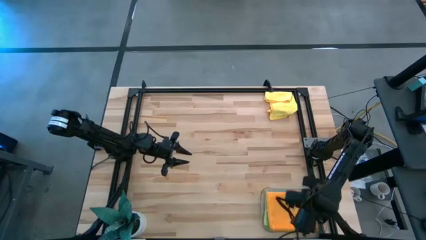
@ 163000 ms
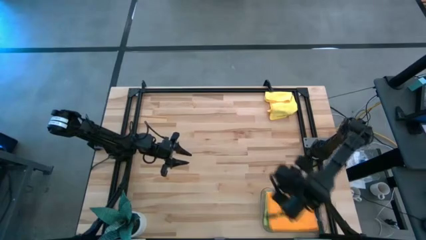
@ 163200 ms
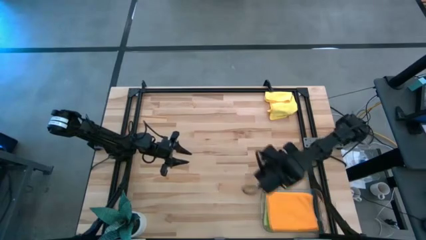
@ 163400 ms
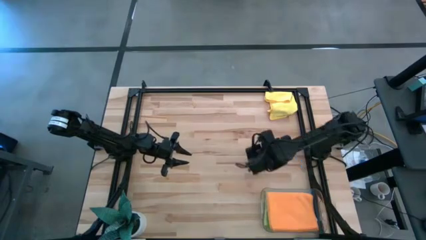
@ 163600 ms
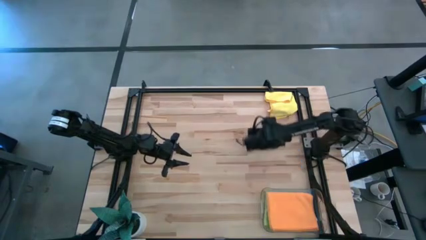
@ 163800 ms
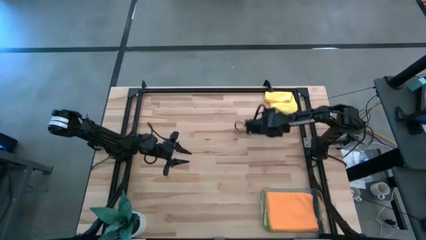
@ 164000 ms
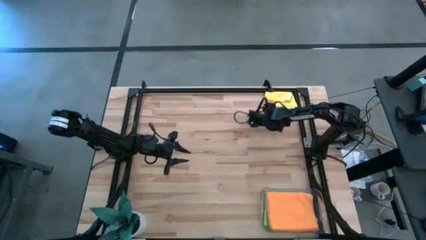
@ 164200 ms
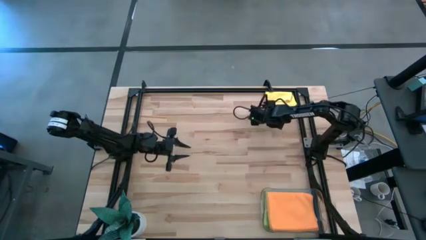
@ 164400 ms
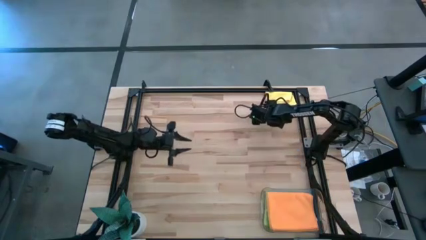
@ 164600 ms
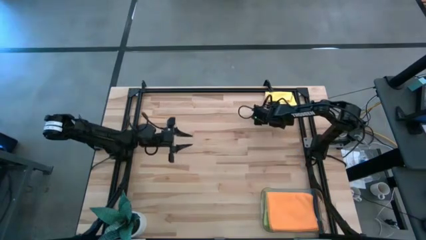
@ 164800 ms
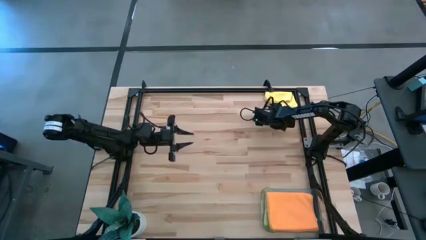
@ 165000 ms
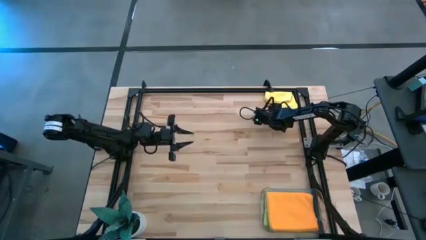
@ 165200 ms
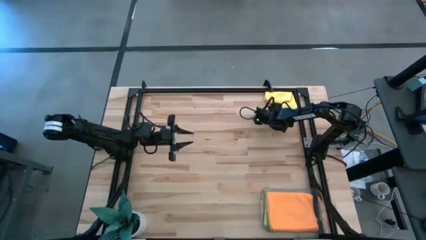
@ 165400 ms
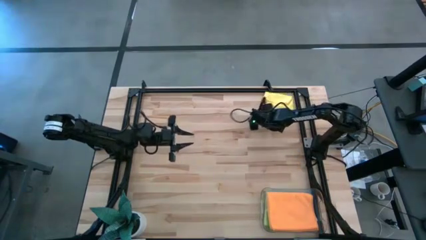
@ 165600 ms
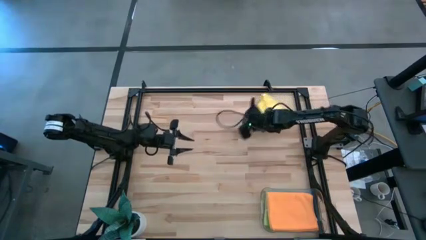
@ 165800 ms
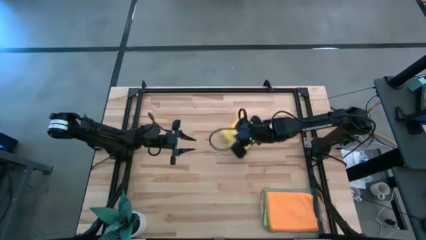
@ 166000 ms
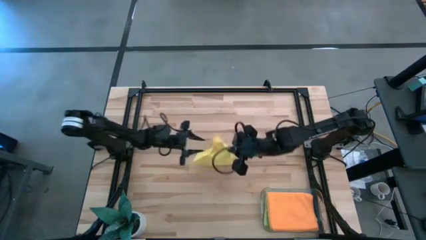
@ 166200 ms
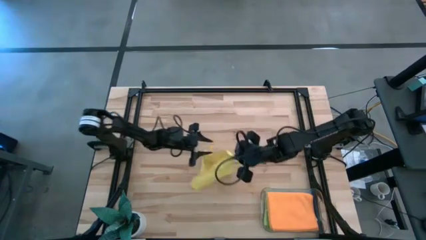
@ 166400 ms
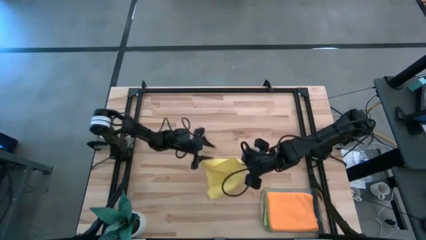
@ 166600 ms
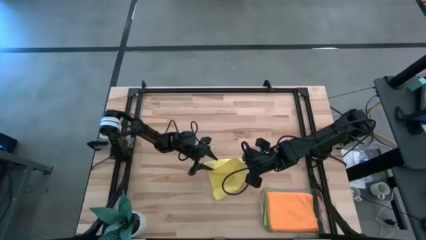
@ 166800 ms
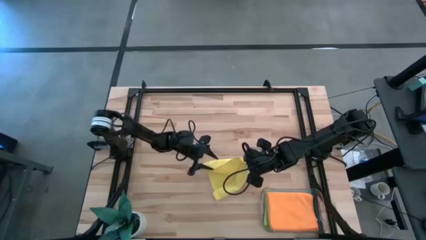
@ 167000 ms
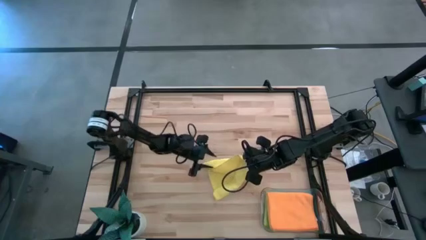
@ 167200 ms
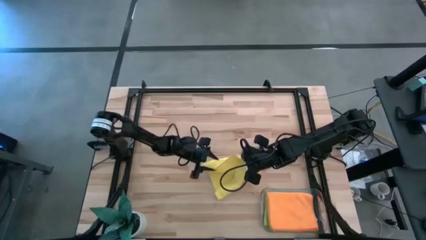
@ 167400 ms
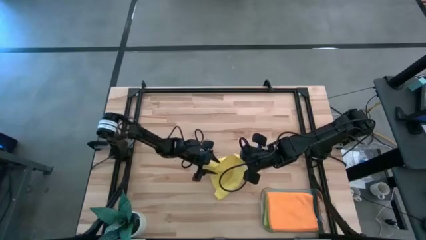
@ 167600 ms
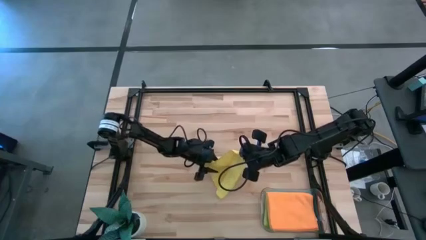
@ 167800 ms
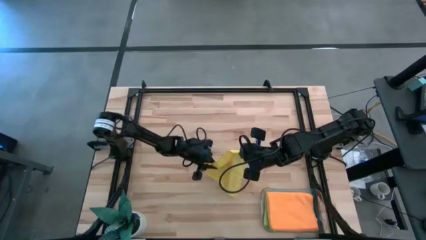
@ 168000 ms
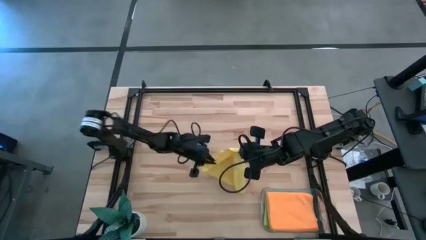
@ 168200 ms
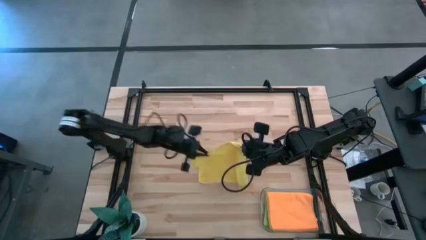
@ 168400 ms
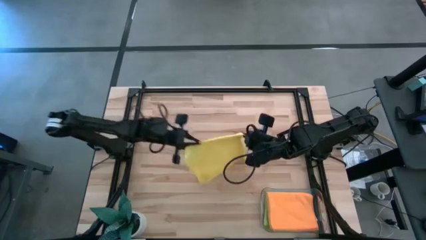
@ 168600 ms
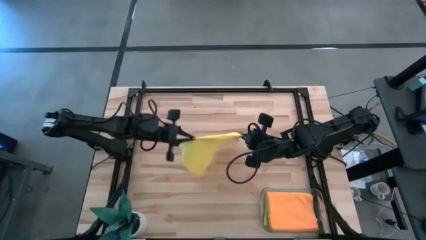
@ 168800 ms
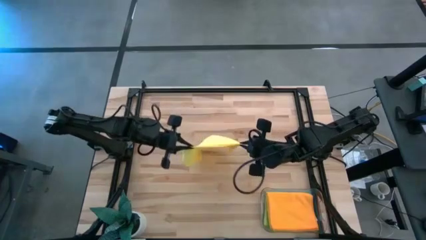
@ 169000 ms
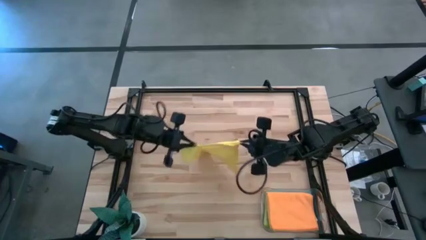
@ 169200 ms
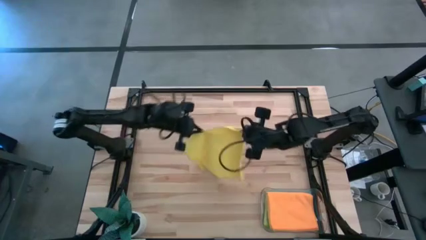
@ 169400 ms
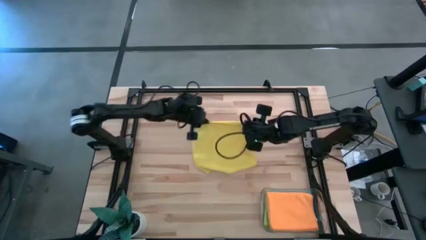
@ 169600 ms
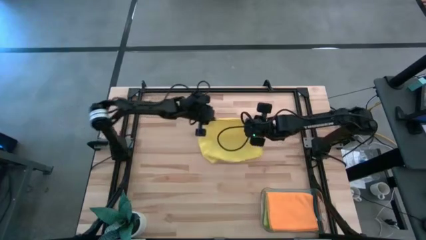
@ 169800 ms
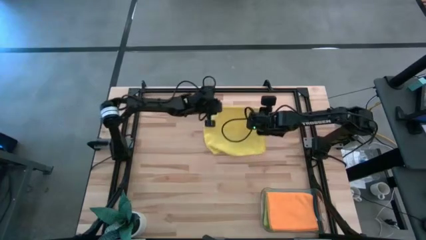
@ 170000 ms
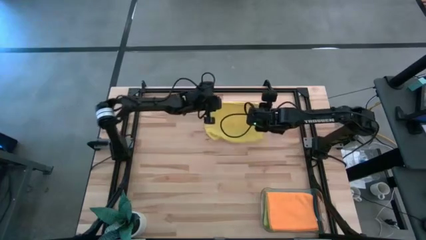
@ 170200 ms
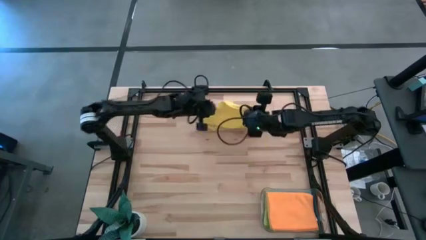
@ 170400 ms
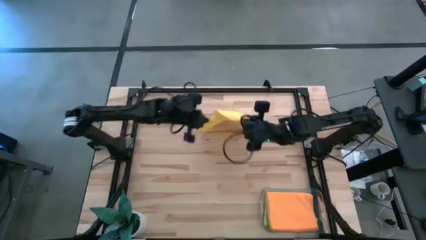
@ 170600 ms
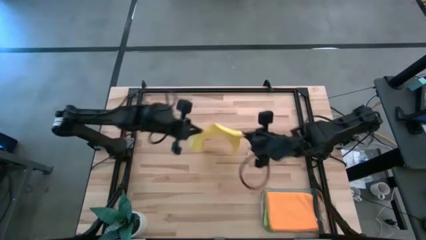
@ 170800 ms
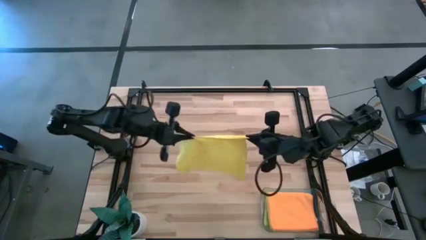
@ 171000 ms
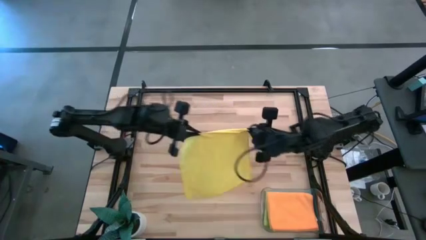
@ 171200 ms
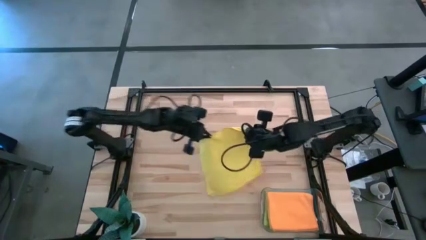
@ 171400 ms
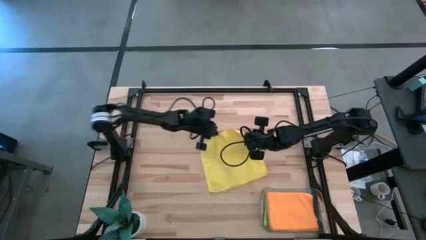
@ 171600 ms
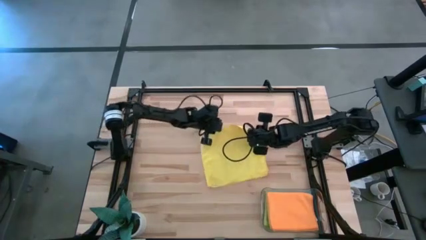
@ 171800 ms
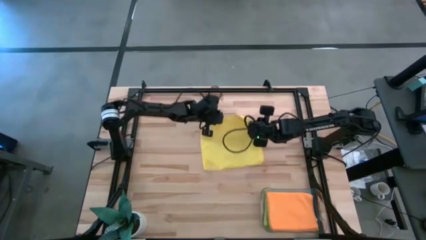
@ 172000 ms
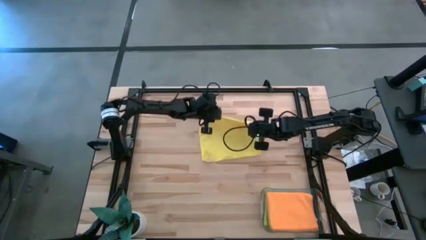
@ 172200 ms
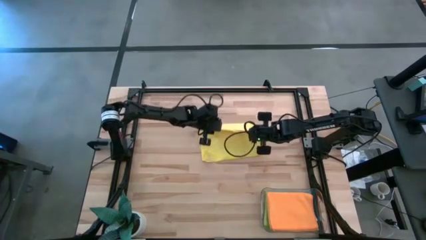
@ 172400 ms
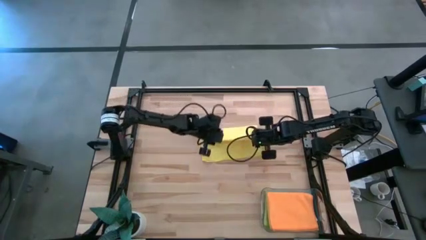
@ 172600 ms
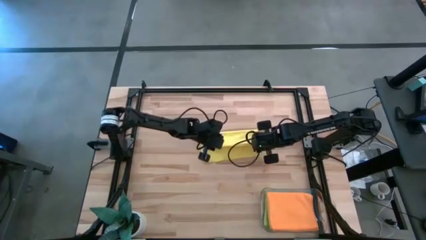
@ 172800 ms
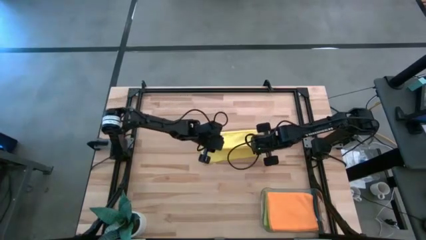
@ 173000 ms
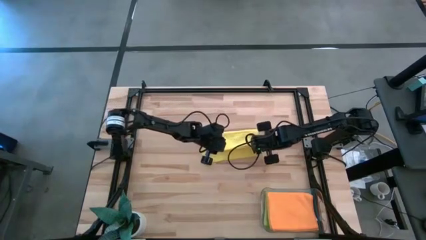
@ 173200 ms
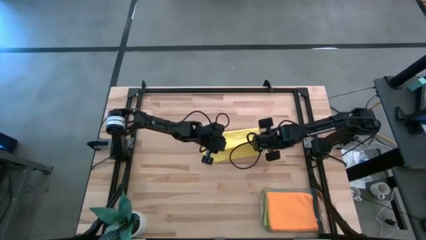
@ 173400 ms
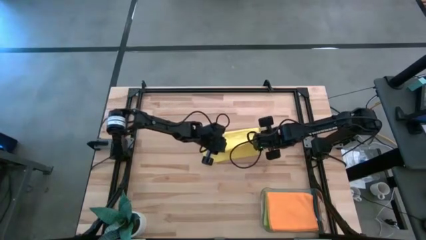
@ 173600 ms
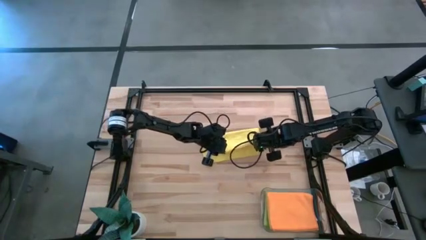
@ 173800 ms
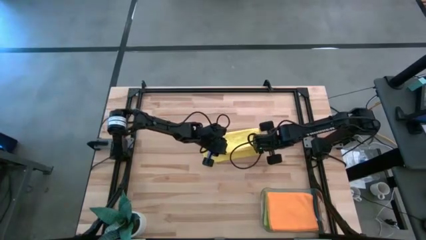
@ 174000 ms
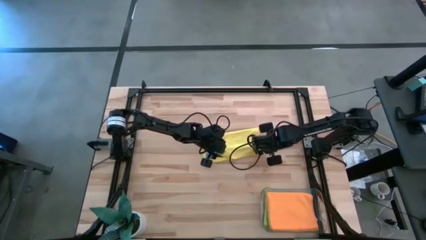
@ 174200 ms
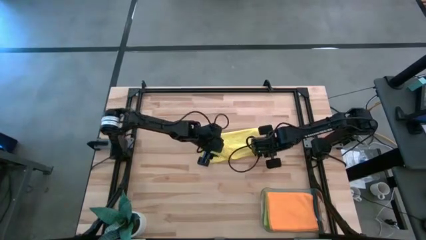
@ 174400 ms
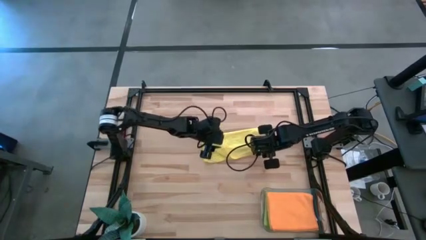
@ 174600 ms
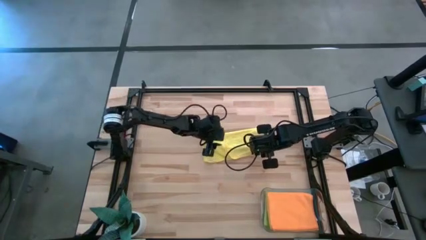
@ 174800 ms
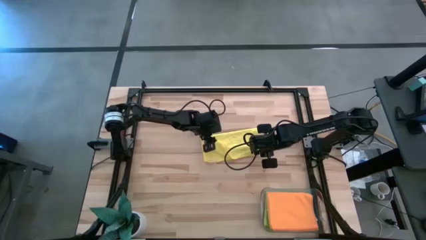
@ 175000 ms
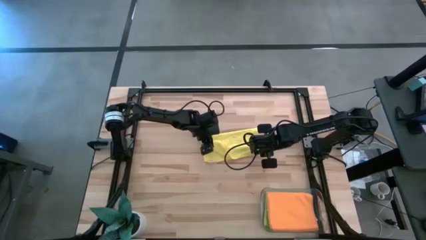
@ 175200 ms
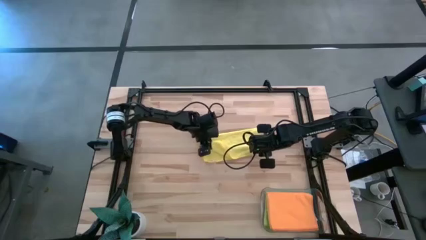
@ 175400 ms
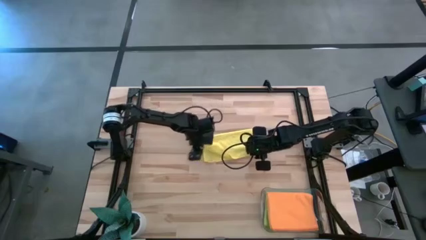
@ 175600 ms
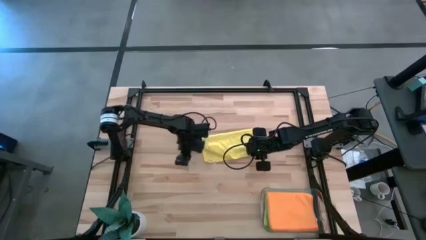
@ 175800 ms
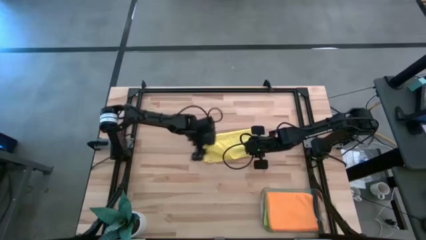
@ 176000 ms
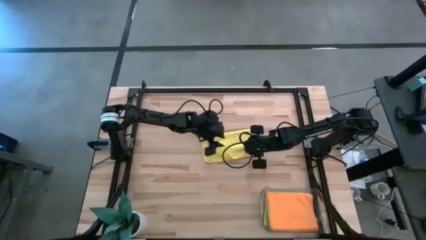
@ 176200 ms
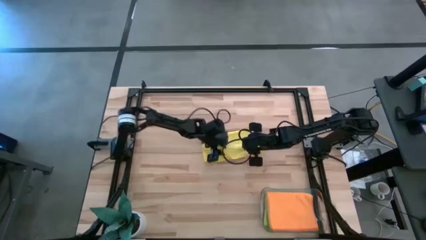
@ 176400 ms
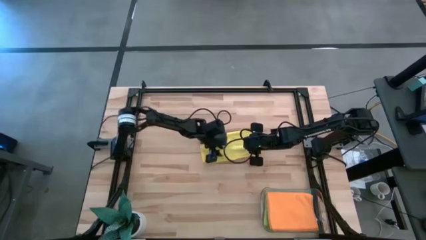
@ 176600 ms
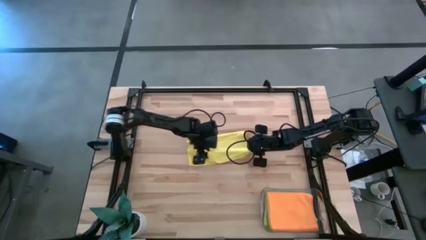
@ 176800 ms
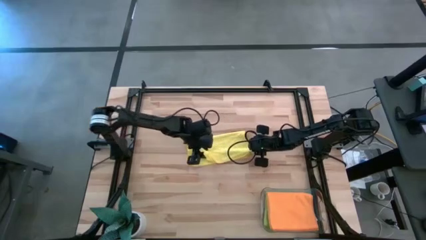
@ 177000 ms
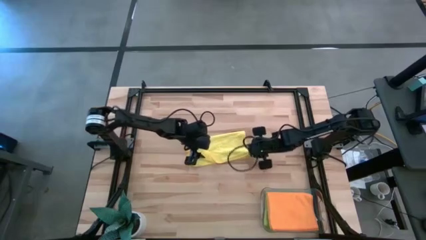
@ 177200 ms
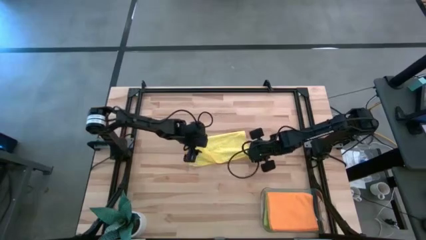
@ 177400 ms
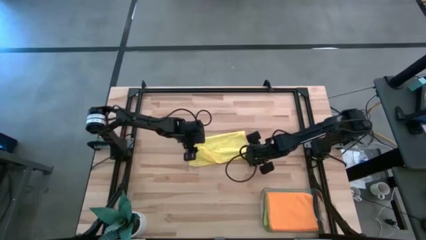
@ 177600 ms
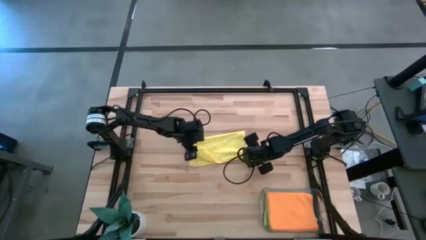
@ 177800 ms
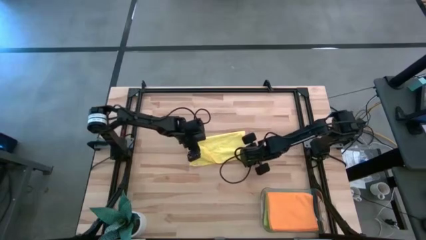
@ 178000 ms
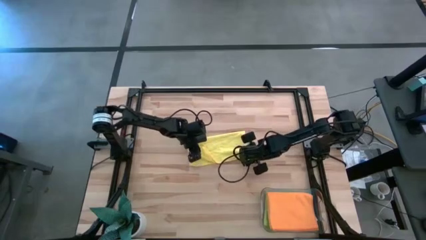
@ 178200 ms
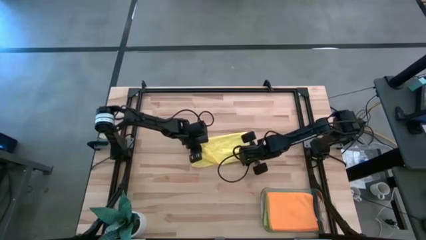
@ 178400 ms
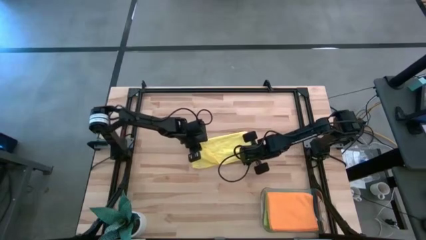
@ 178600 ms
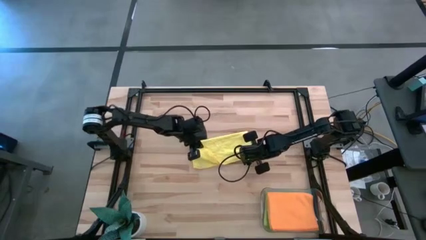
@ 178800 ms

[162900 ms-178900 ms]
Task: Fold microfiber towels
Fold the yellow microfiber towel
